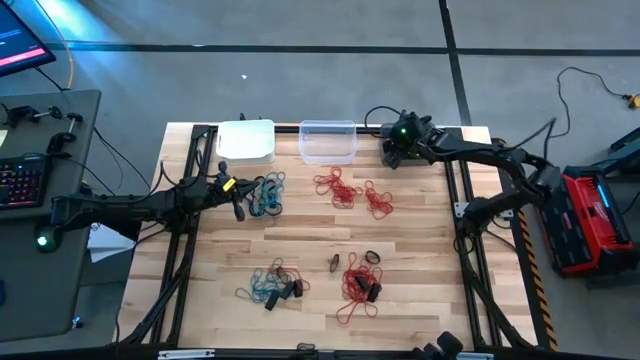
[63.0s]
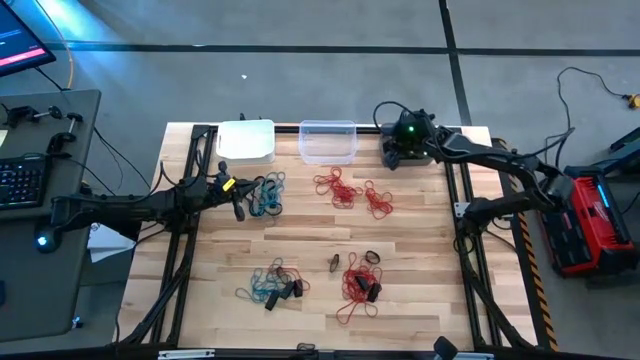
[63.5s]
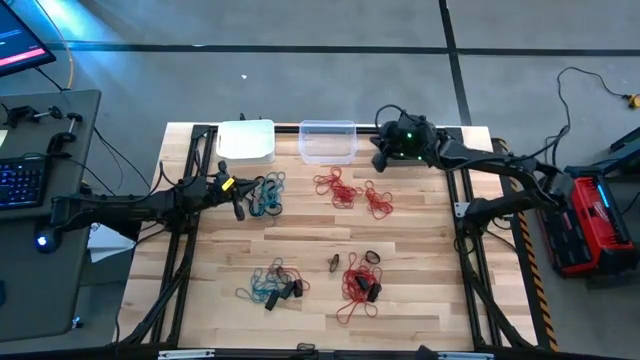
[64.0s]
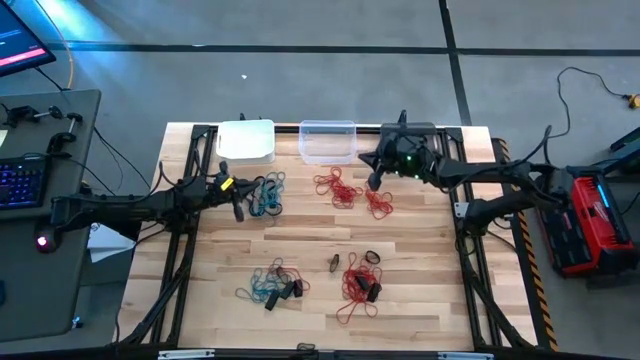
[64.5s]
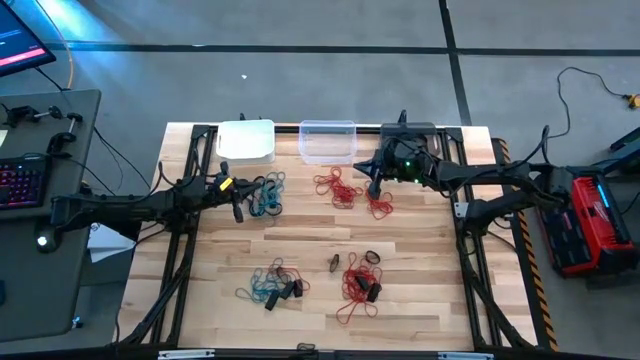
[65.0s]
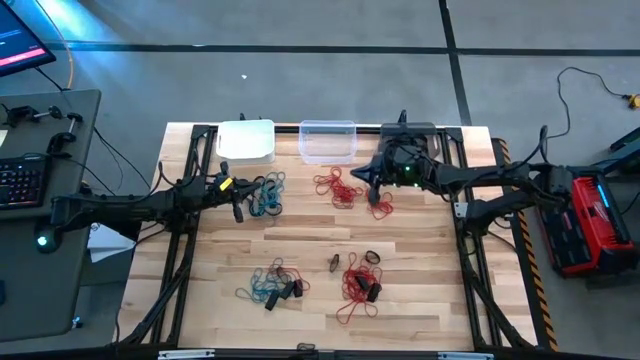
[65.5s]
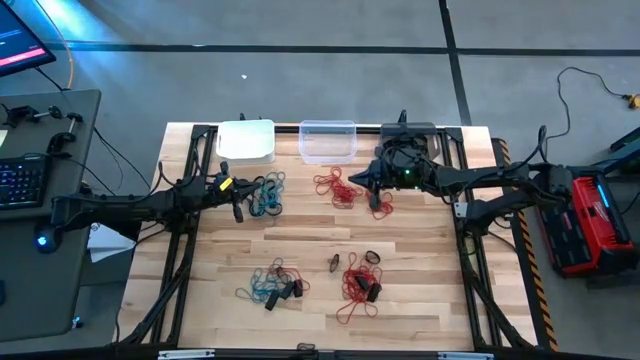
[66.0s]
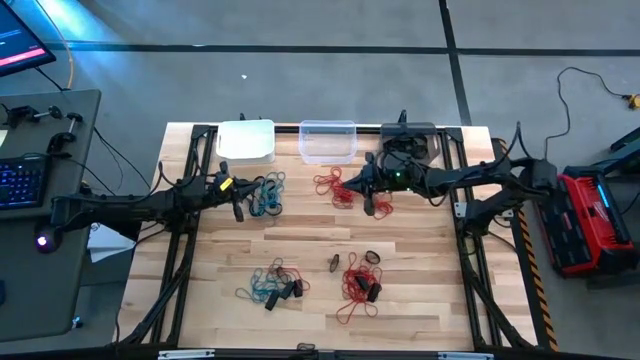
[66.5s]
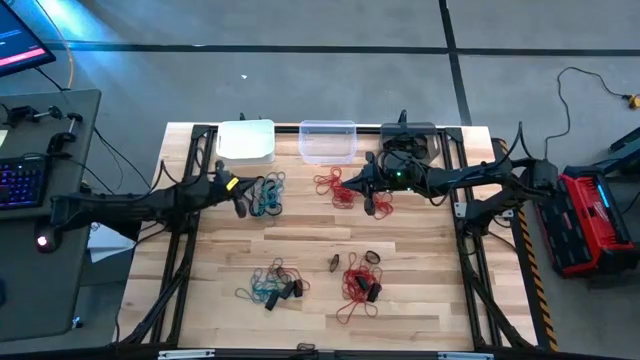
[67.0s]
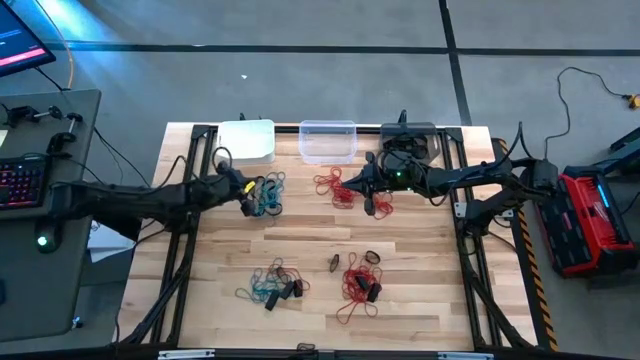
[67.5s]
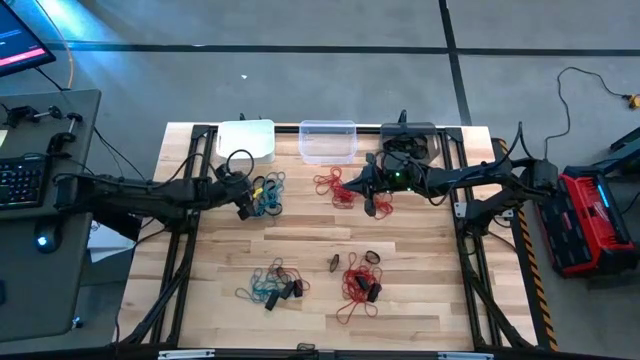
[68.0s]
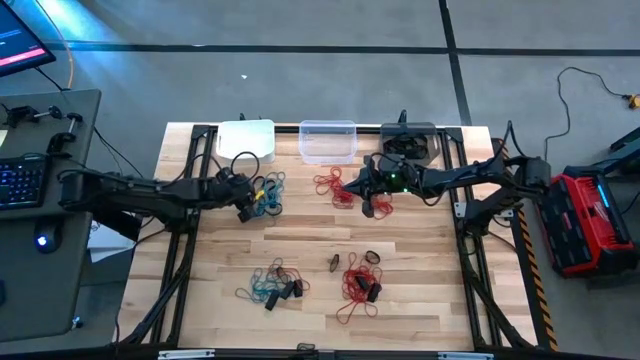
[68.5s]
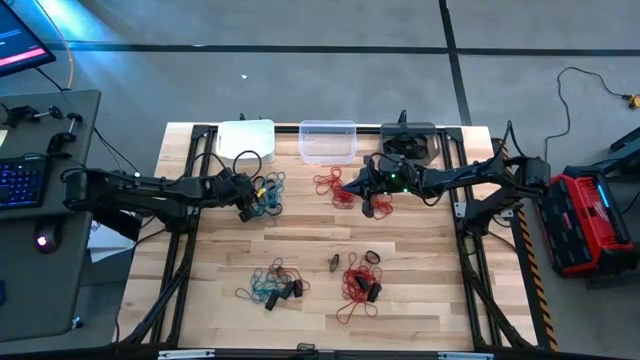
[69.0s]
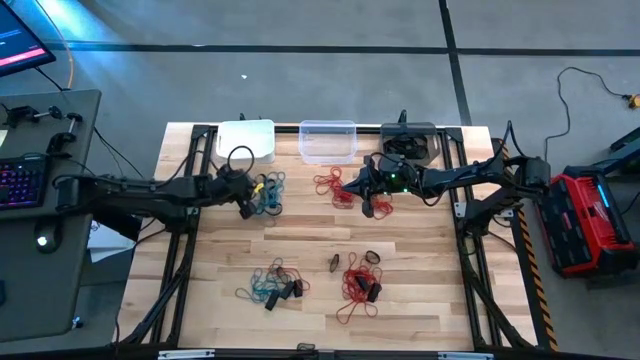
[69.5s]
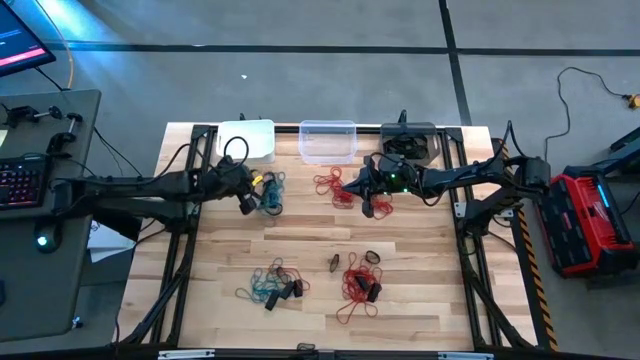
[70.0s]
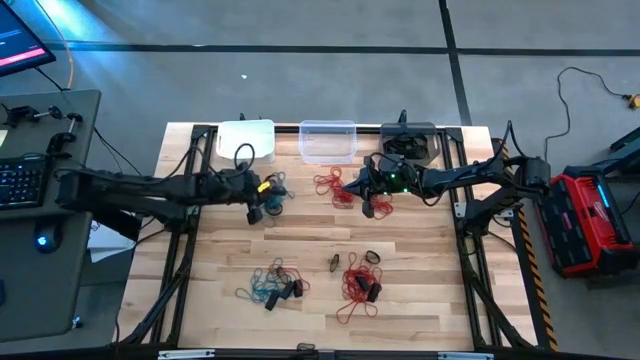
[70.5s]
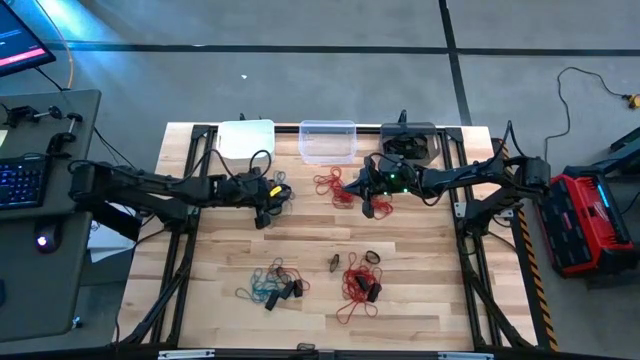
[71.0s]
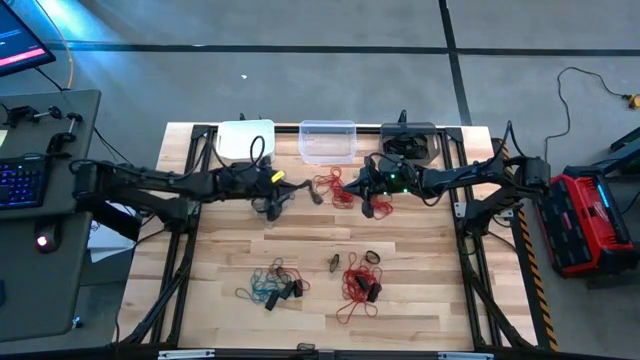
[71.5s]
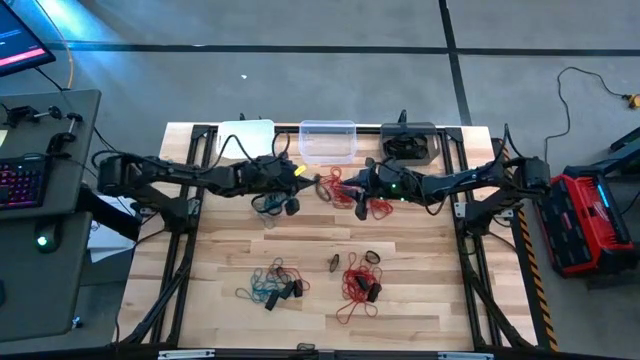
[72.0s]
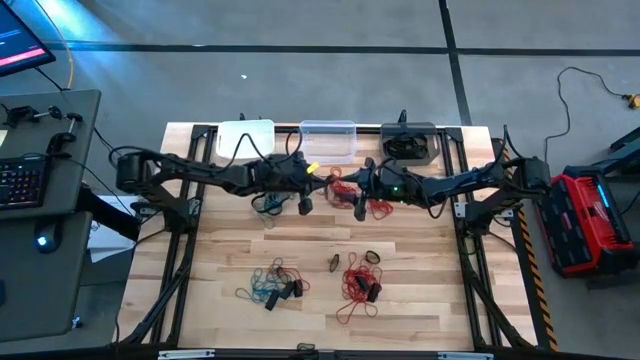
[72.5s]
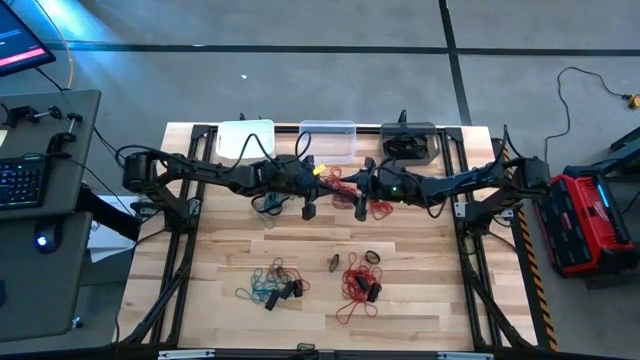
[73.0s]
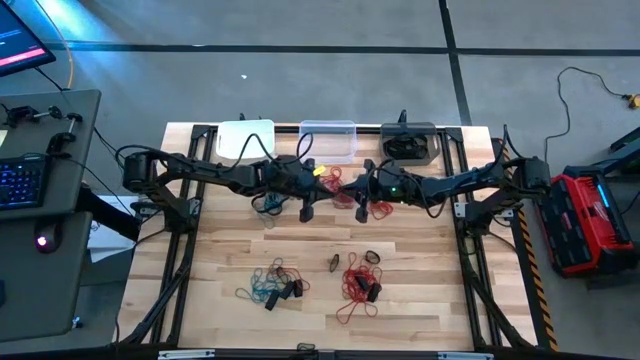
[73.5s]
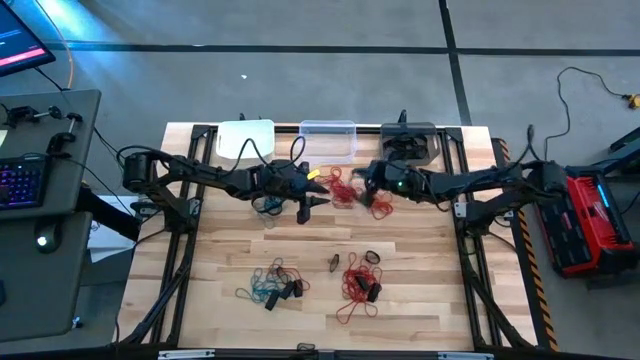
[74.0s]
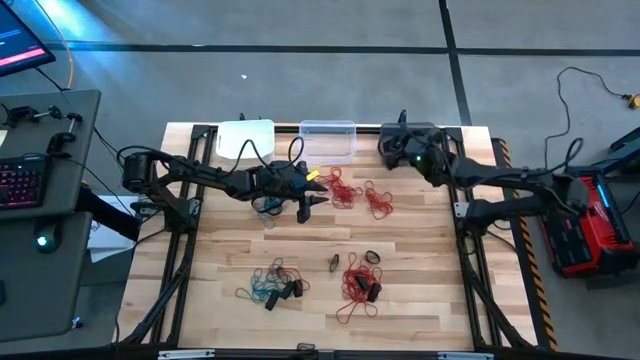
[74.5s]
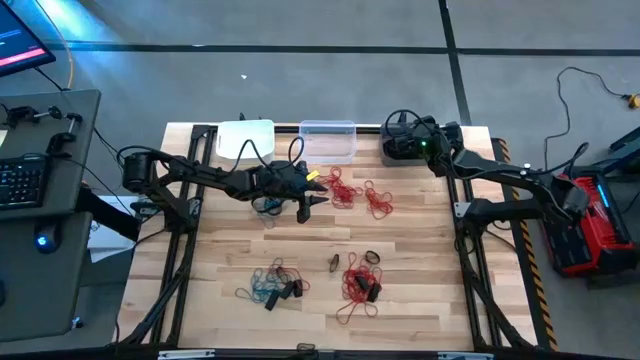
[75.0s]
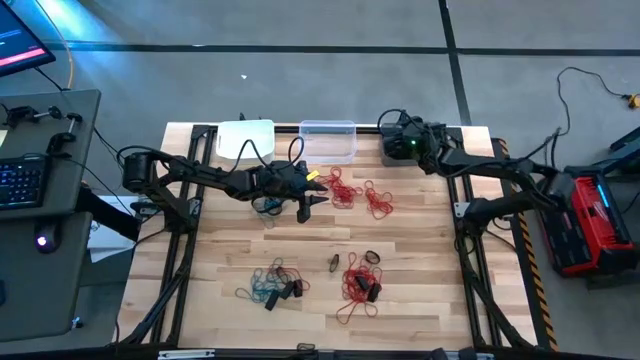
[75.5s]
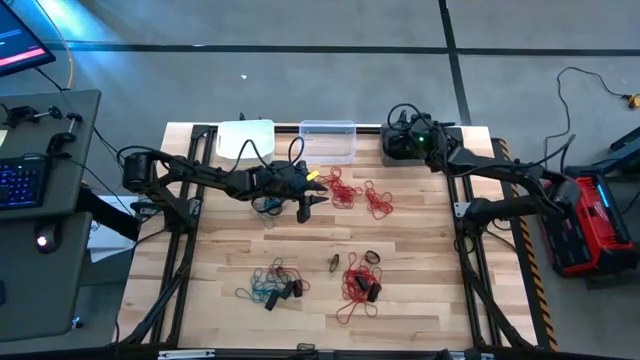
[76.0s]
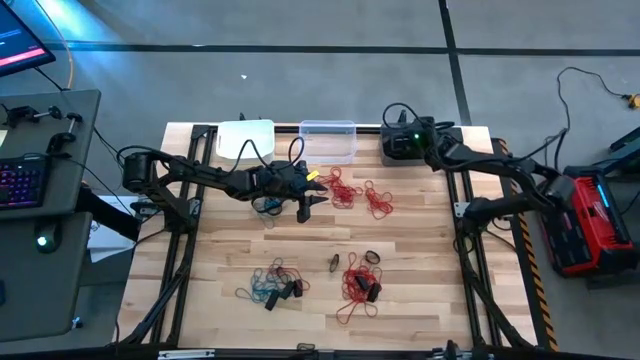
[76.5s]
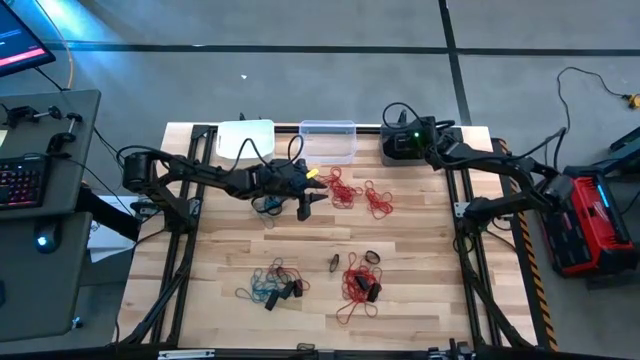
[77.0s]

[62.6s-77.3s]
Task: Sort rubber bands into baskets
Put the black rubber band into the black bin

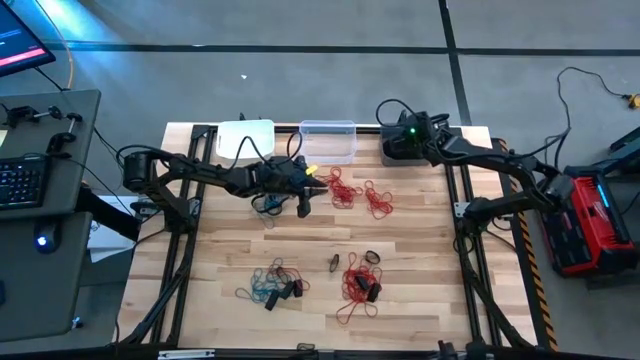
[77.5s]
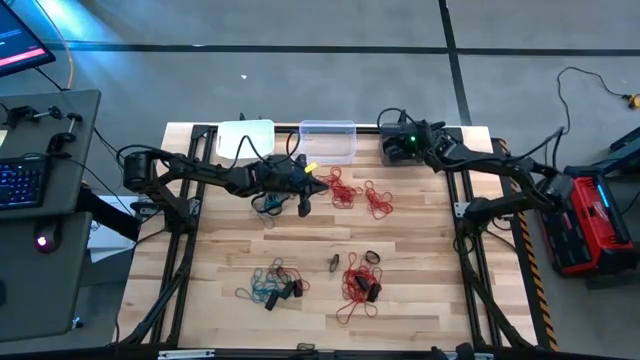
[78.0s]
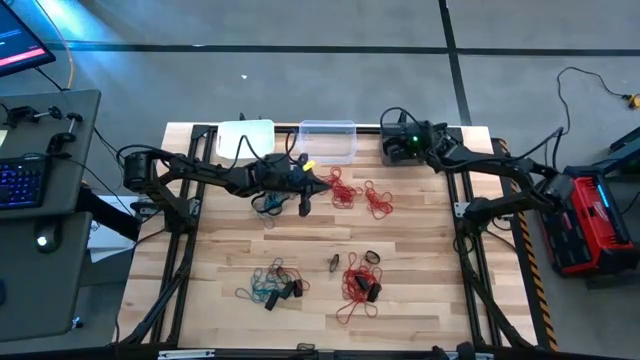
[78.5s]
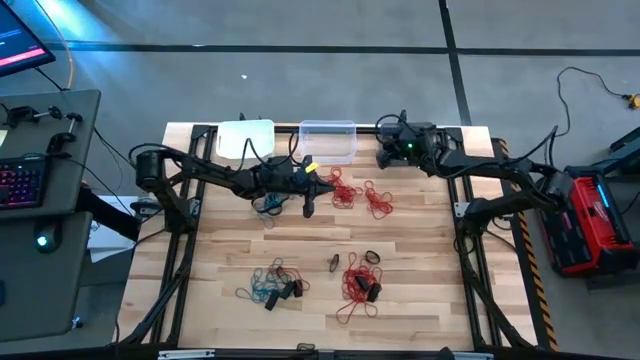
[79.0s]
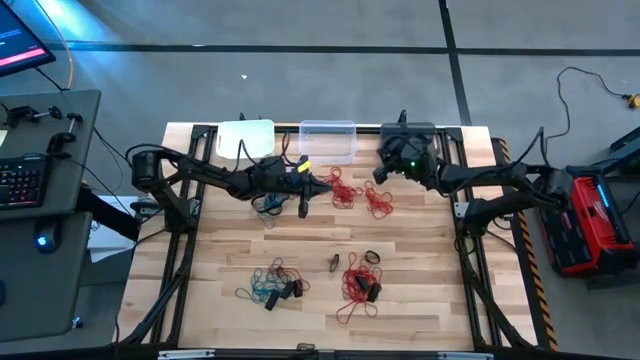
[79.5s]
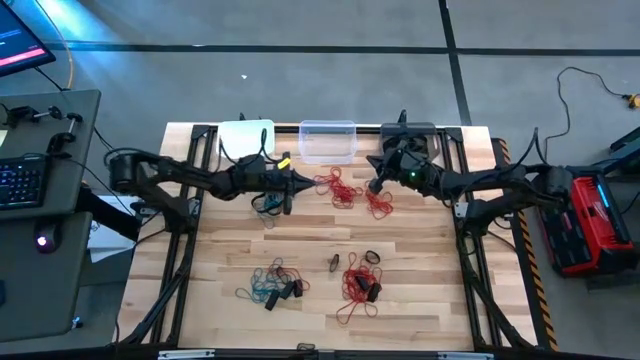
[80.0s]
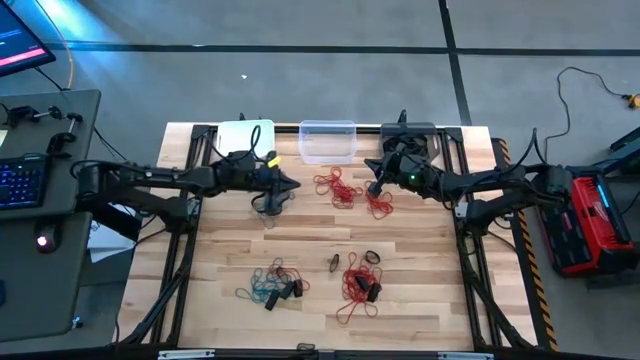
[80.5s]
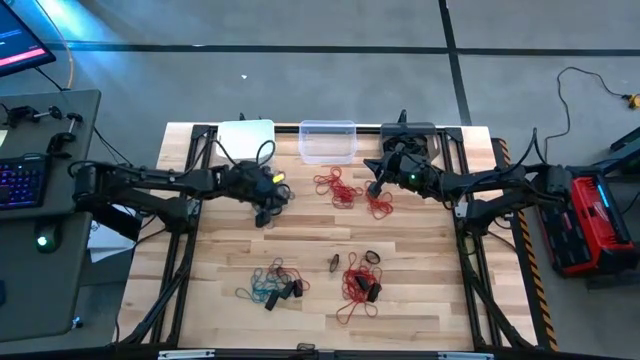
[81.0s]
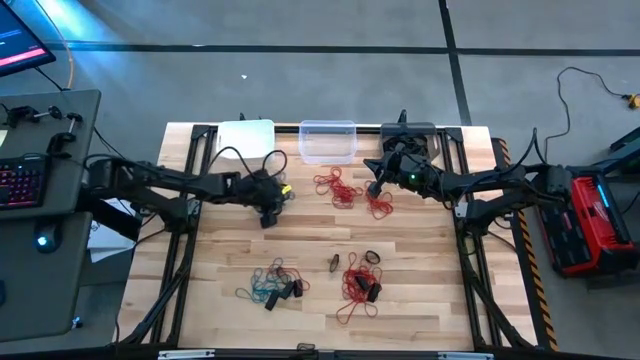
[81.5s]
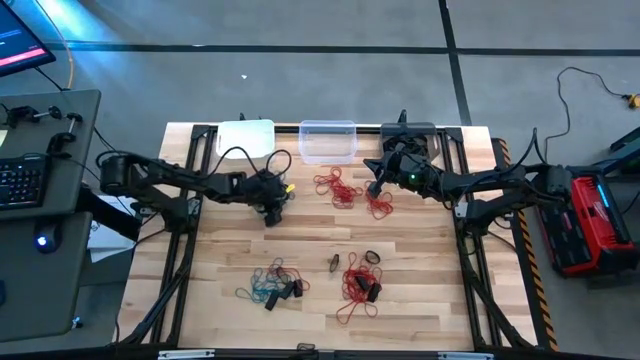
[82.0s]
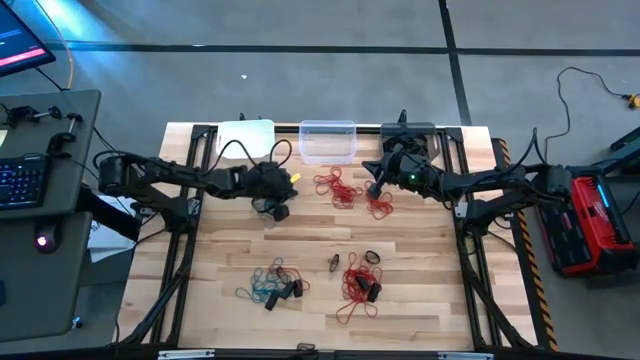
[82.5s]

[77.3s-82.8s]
Put the black rubber band into the black bin

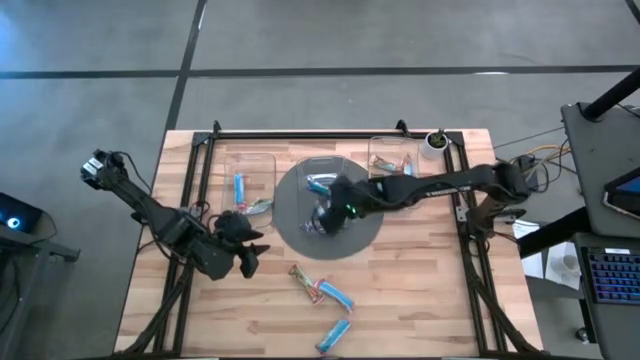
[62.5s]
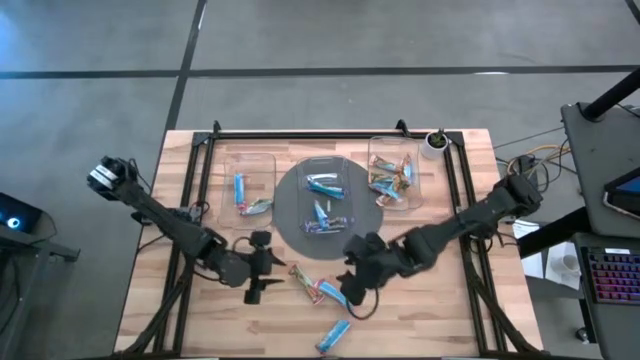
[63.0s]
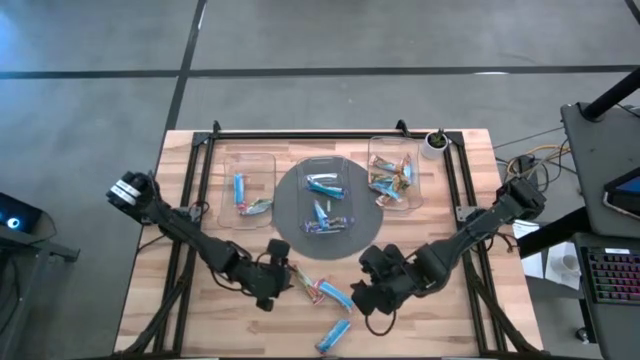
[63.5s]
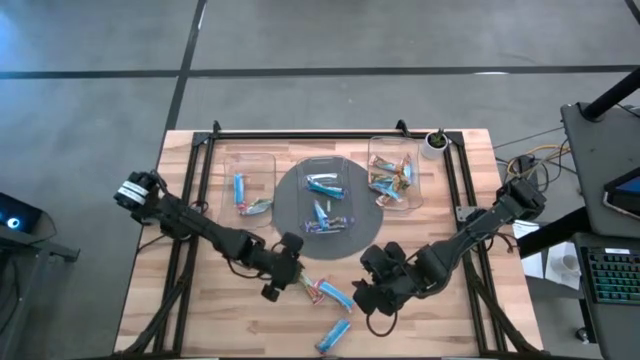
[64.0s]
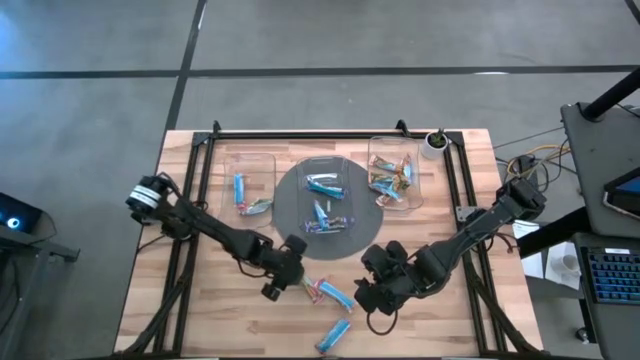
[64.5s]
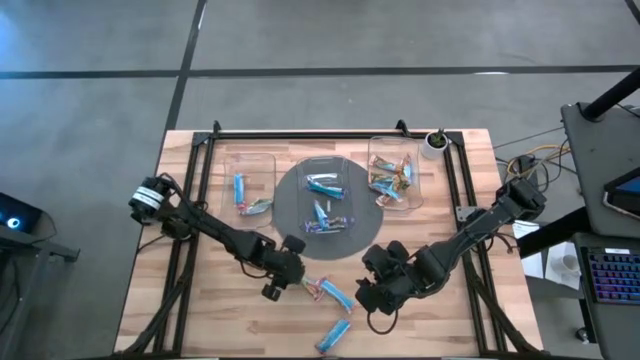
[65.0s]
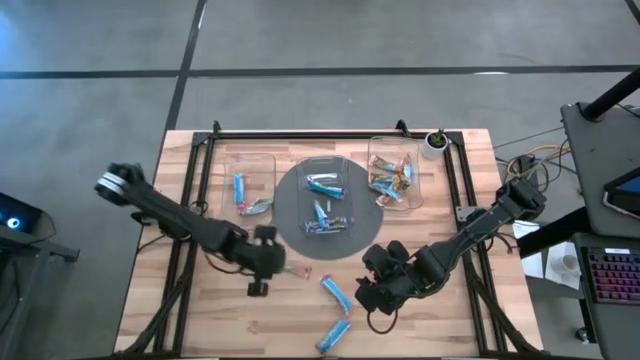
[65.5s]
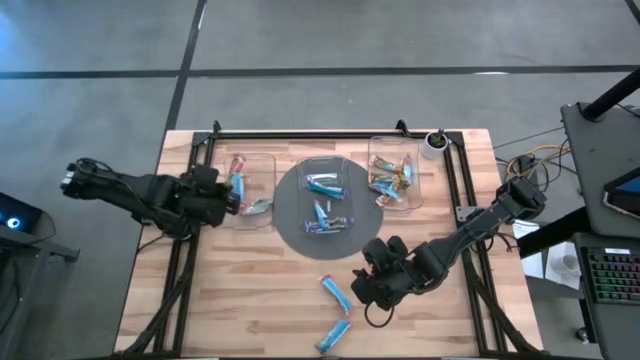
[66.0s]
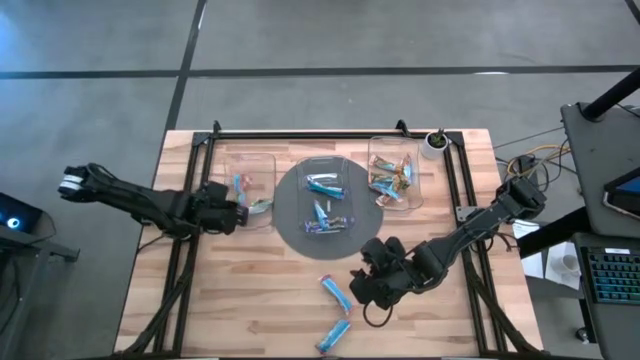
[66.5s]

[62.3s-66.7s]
Task: Pick and place Granola Bars by type
Put the red granola bar into the left transparent bin
